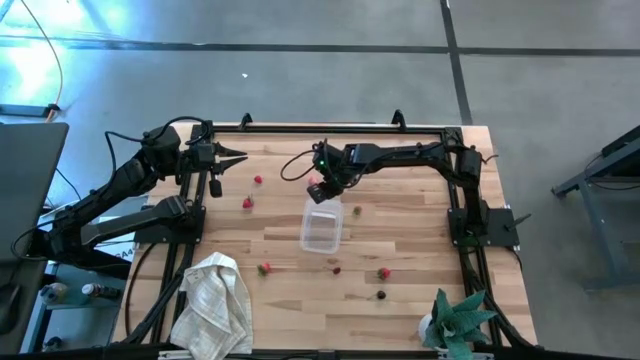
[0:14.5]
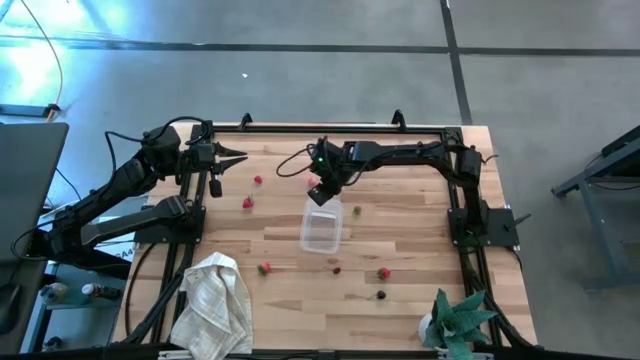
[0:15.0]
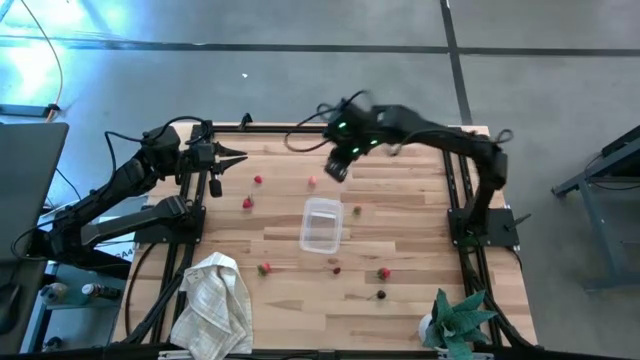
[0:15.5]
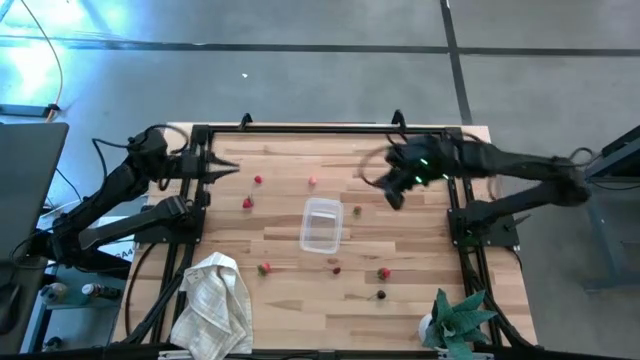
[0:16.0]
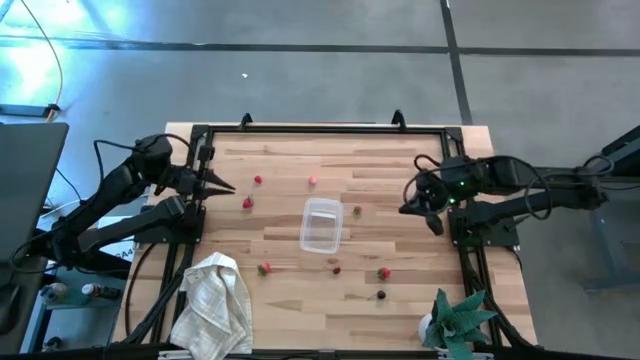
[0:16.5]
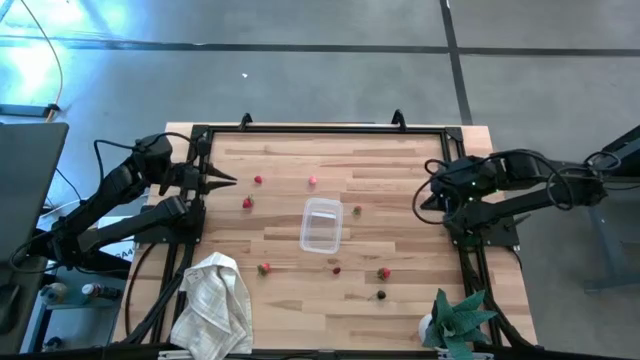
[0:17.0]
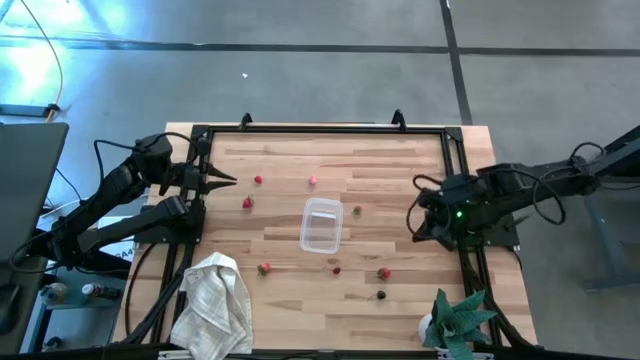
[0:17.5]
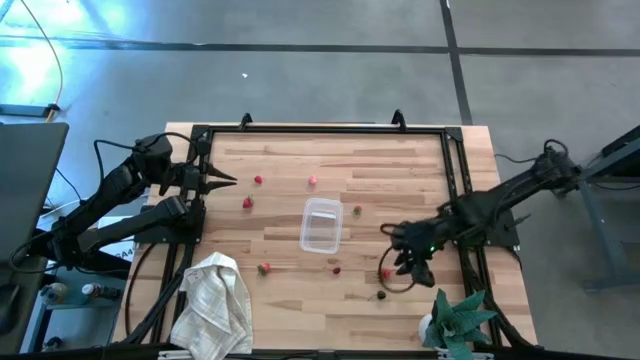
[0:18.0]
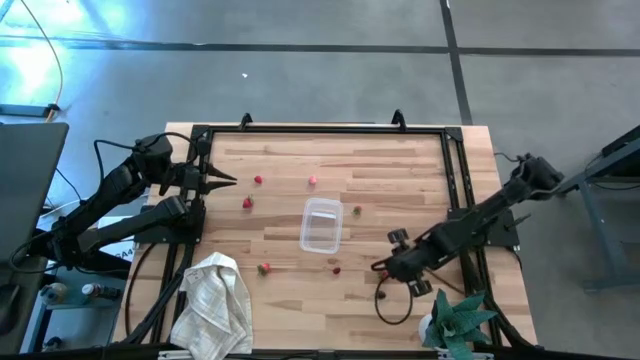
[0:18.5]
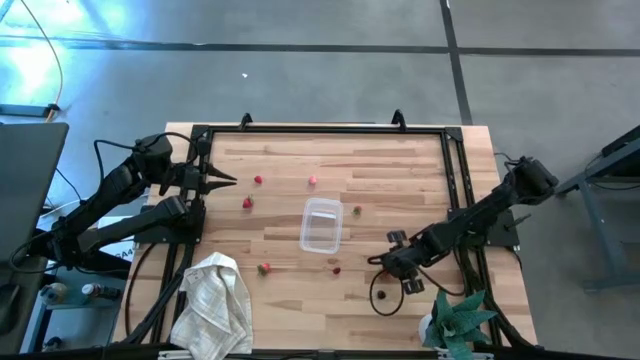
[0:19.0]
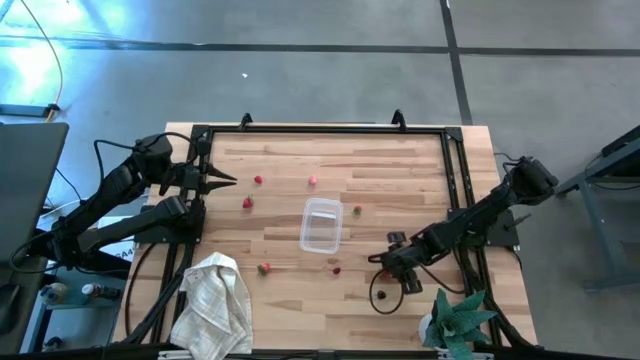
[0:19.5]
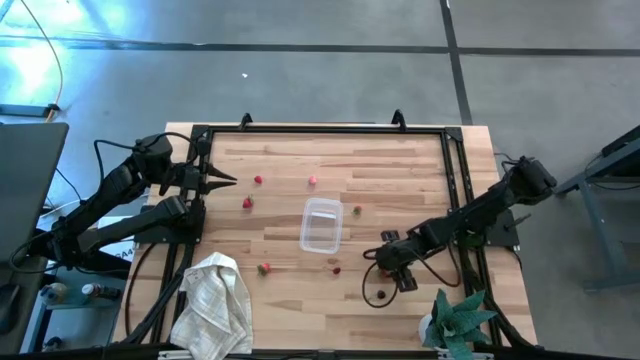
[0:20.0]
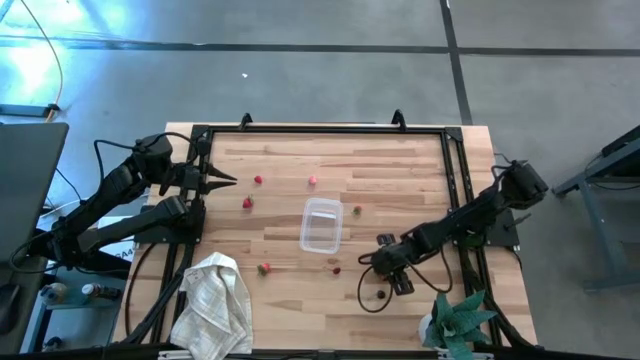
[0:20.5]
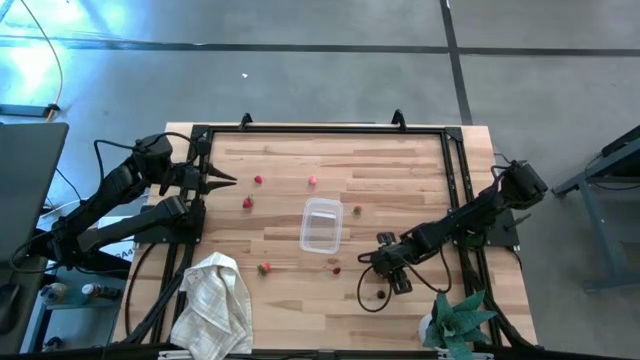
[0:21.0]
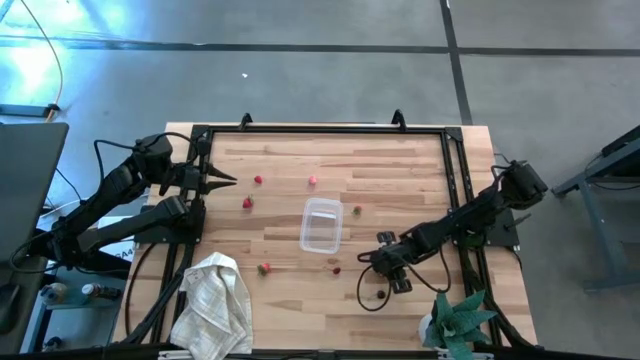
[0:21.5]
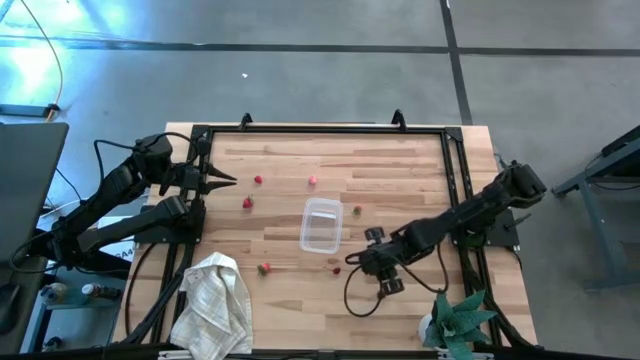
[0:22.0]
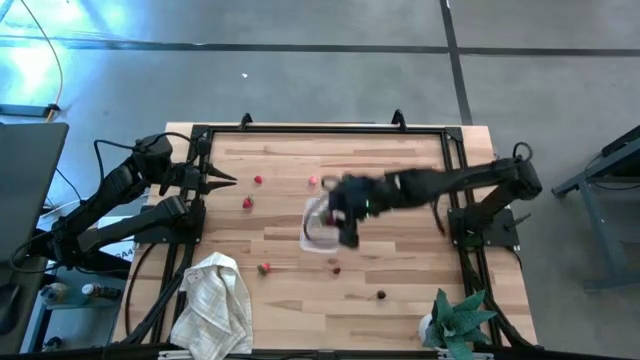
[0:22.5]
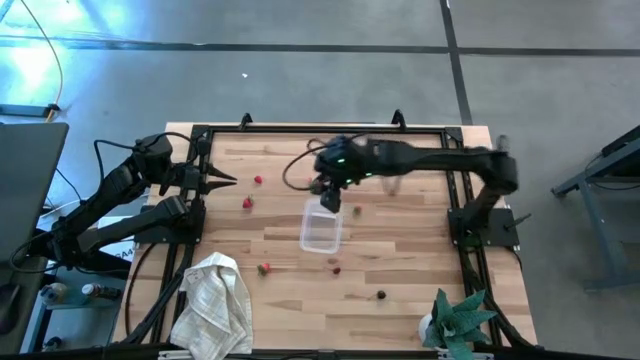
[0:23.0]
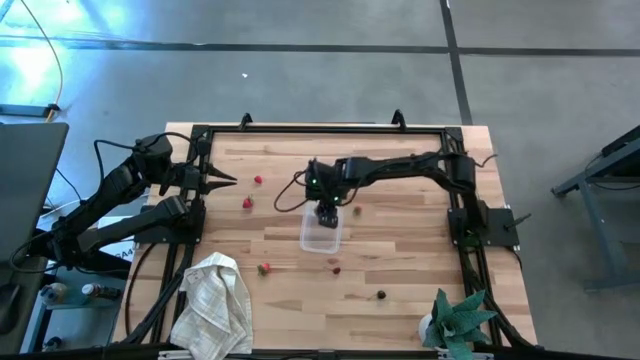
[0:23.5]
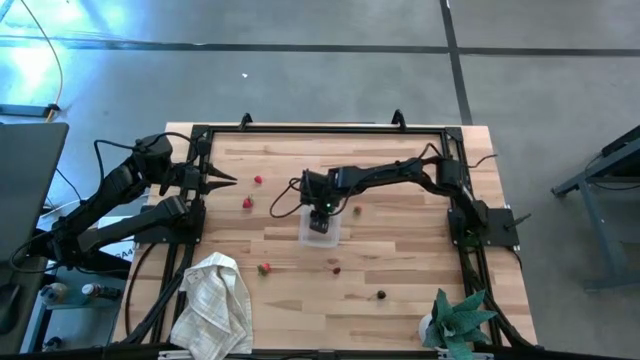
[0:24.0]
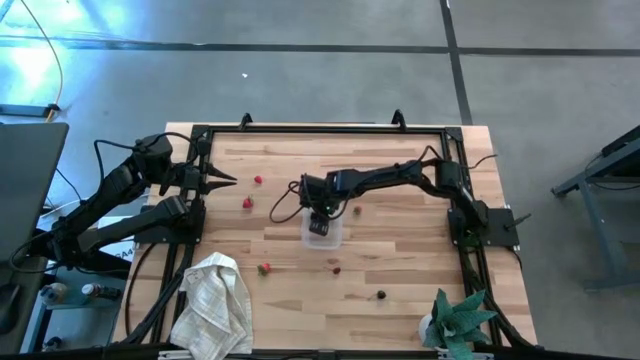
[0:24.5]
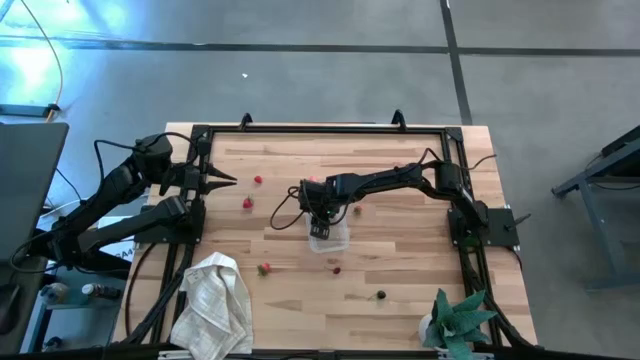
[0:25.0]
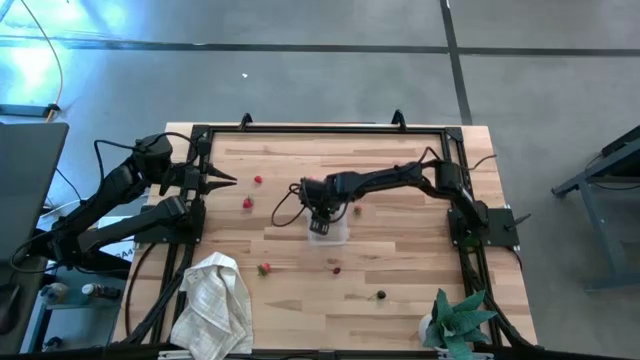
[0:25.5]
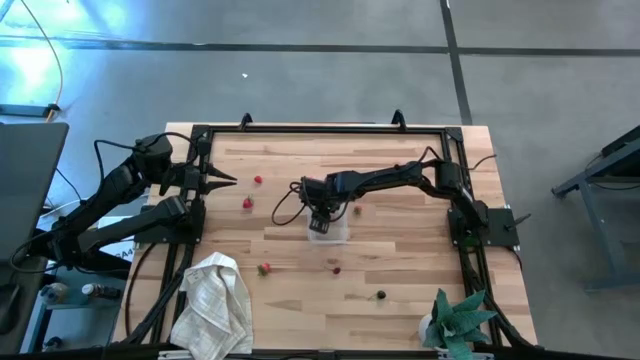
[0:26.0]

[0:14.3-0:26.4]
Task: Pick and placing Produce into tupperware
Put the strawberry into the transparent bin

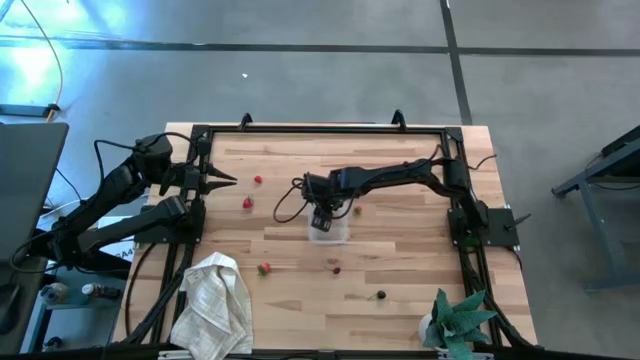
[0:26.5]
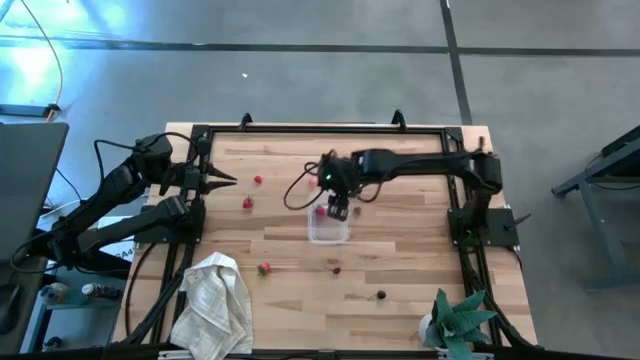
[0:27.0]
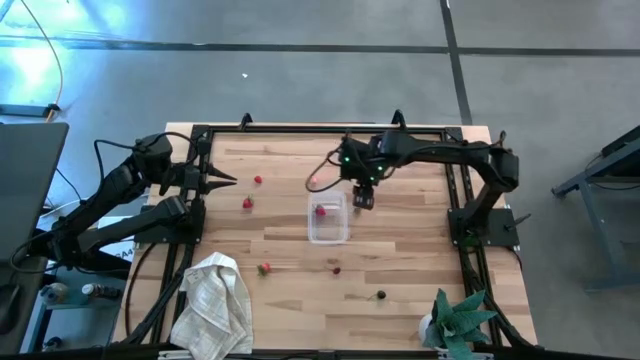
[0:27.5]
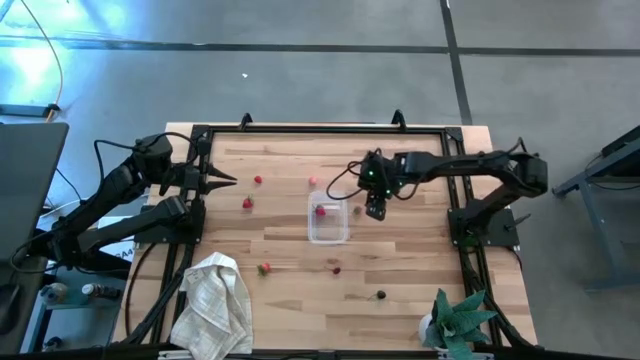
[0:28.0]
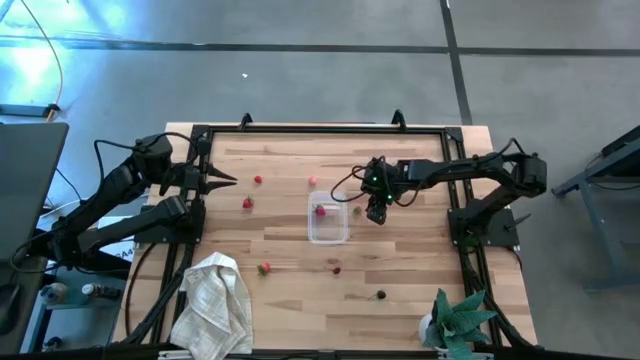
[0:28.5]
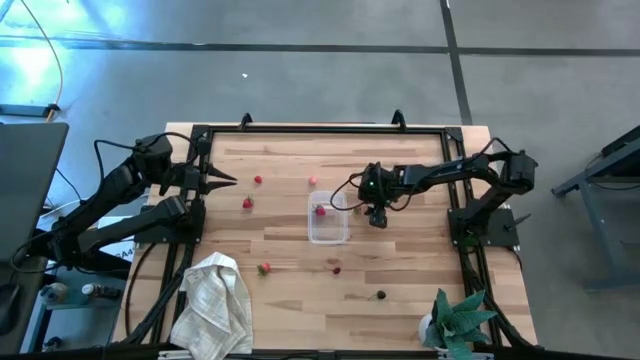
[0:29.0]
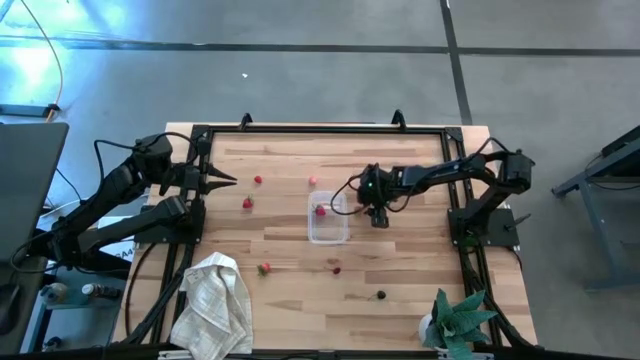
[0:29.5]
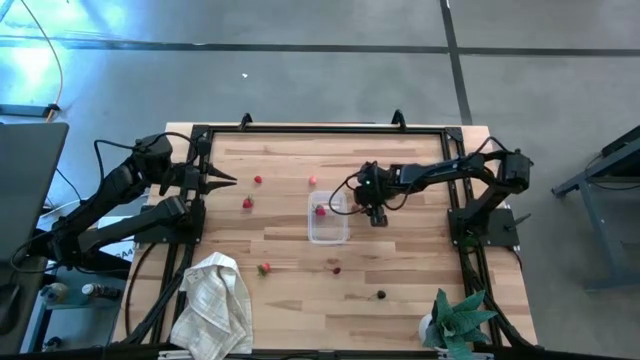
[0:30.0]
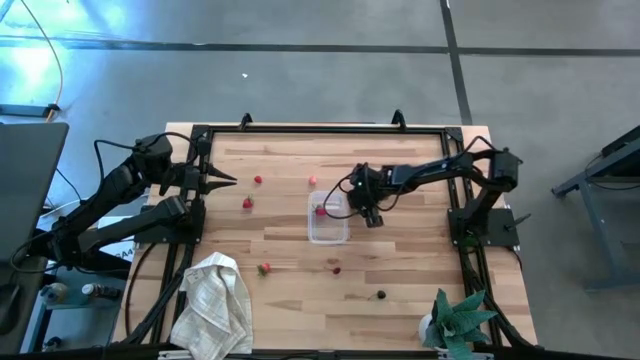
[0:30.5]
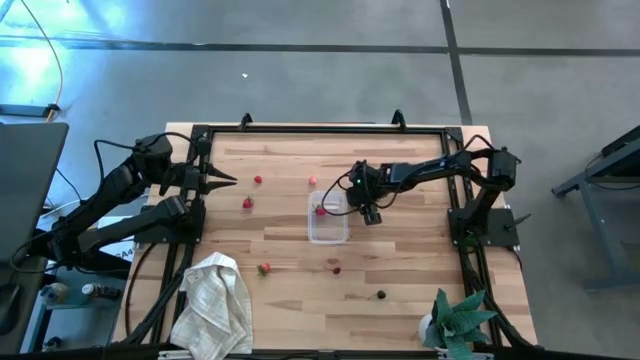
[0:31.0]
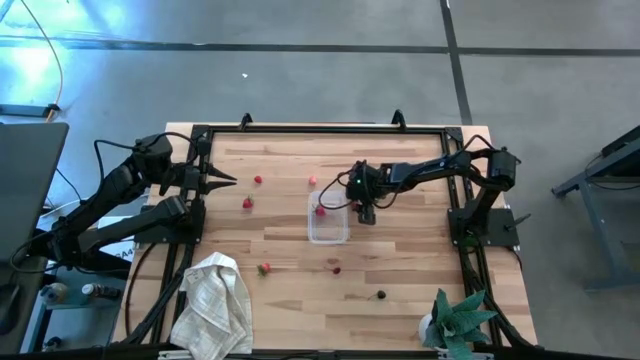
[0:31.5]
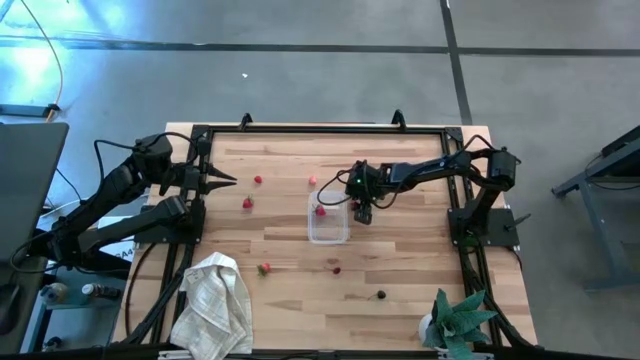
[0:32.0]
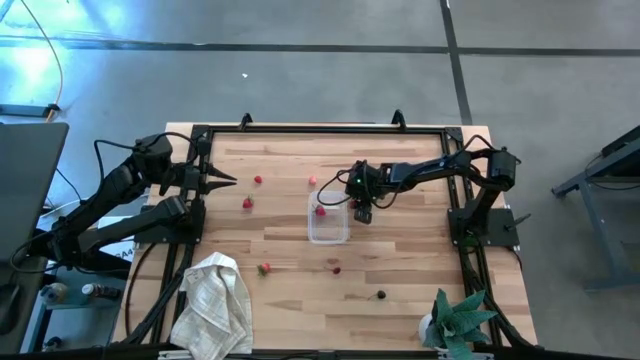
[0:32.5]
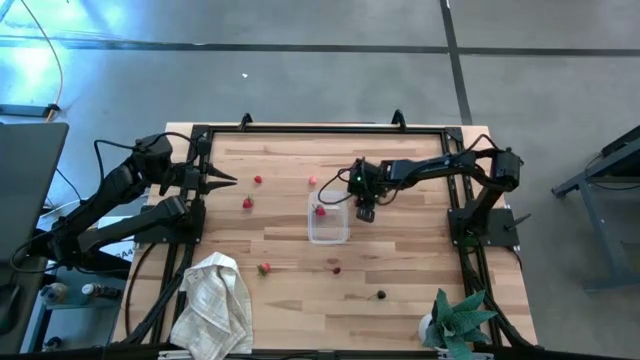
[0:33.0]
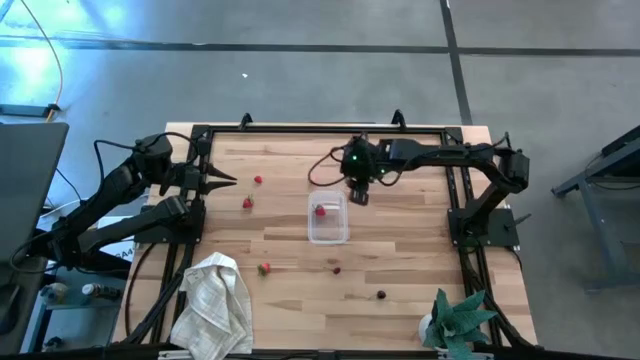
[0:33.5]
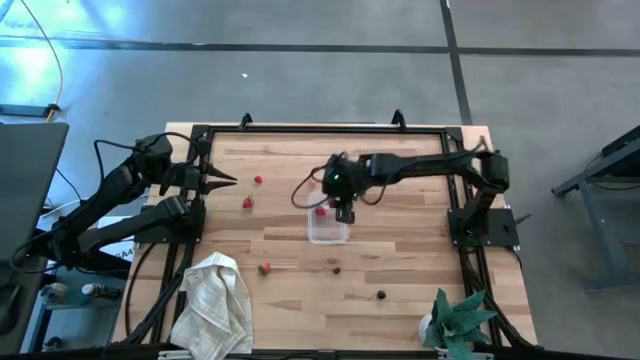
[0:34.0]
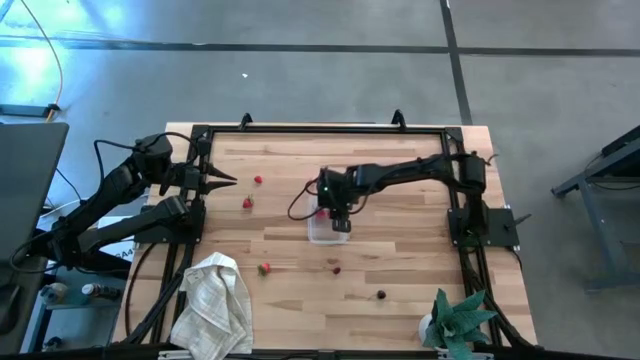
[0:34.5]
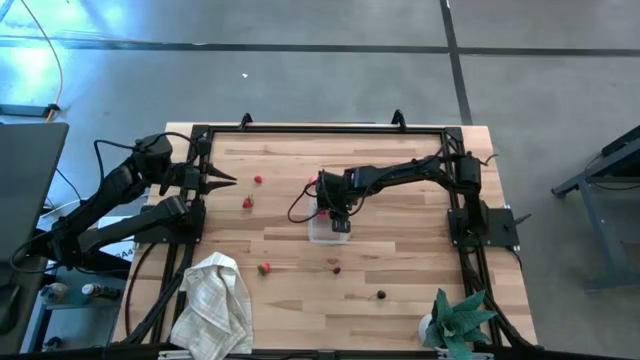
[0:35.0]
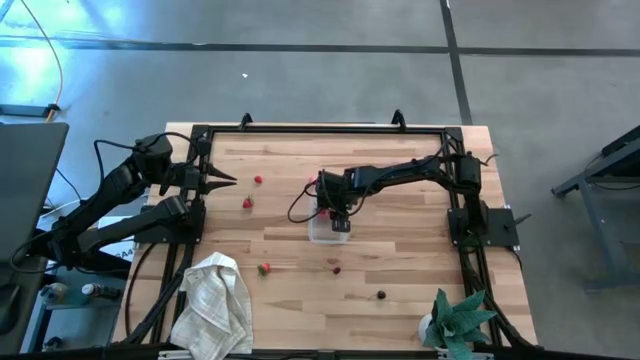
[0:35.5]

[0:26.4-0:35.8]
Put the strawberry into the transparent bin

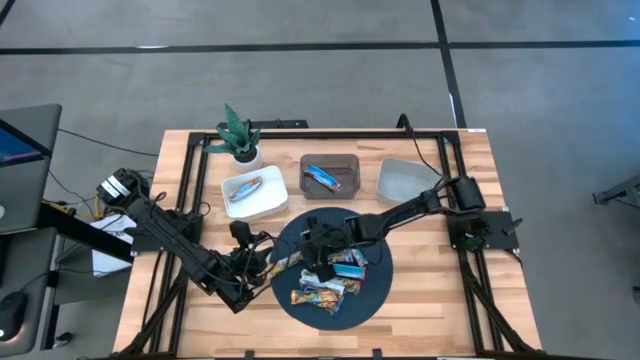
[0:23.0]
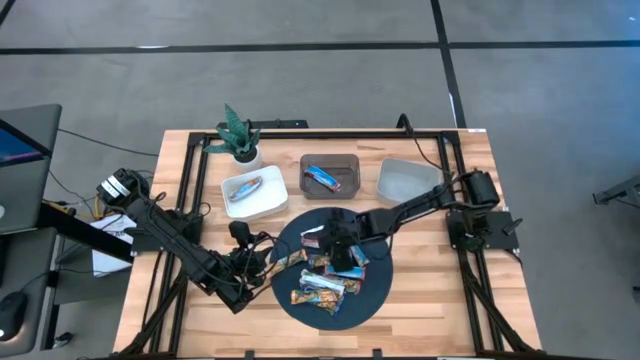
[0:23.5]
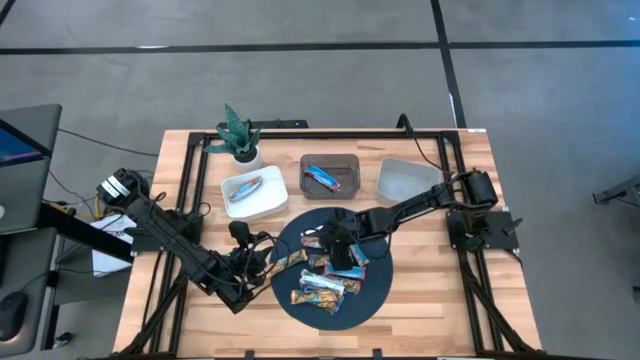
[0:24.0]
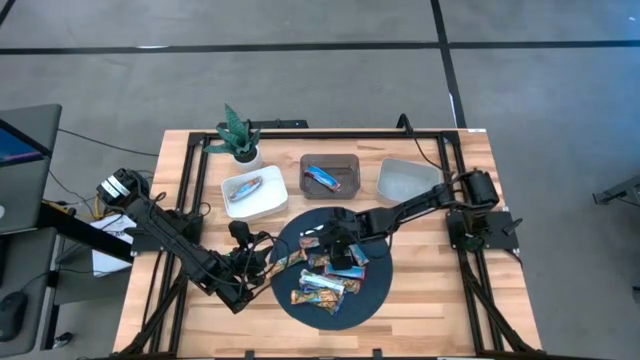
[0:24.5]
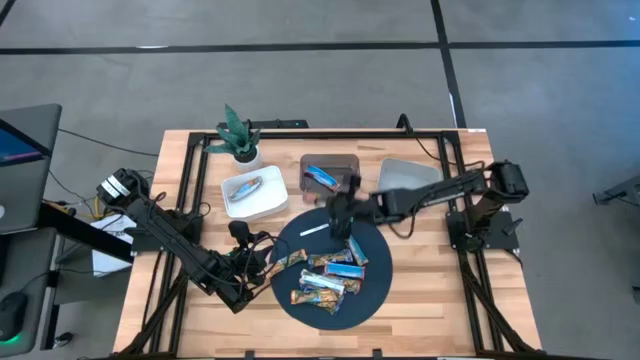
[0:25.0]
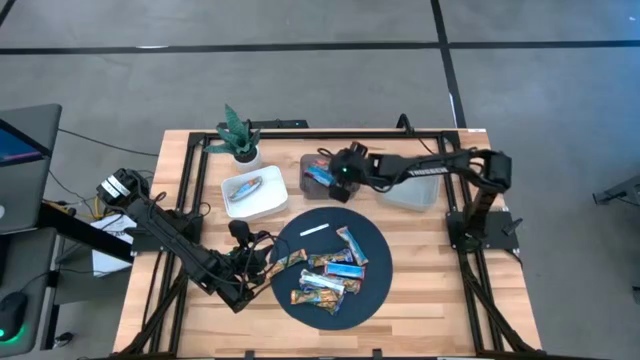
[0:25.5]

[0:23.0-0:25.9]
Task: Pick and place Granola Bars by type
Put the top red granola bar into the black bin
